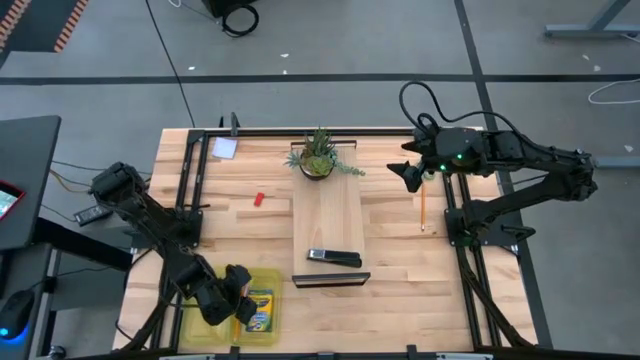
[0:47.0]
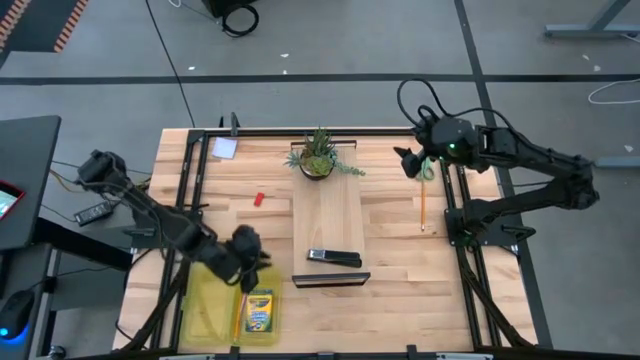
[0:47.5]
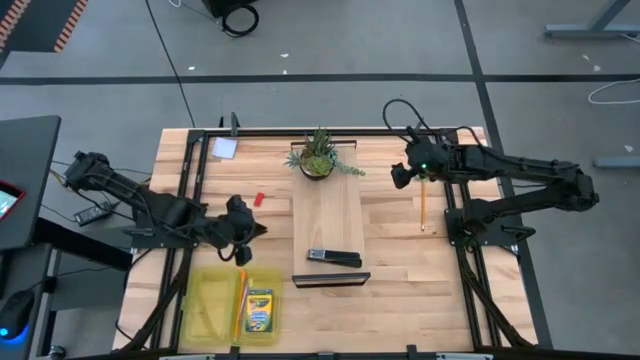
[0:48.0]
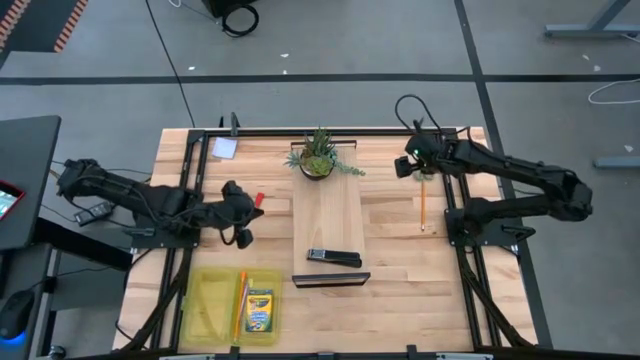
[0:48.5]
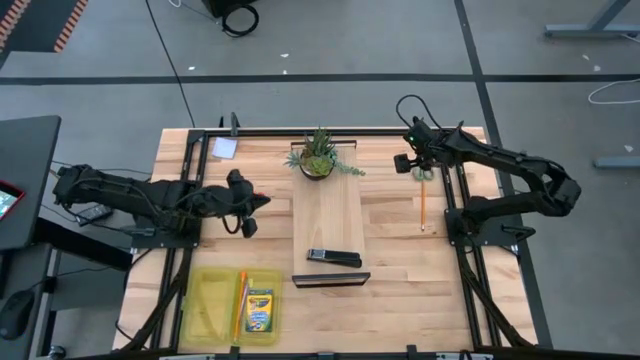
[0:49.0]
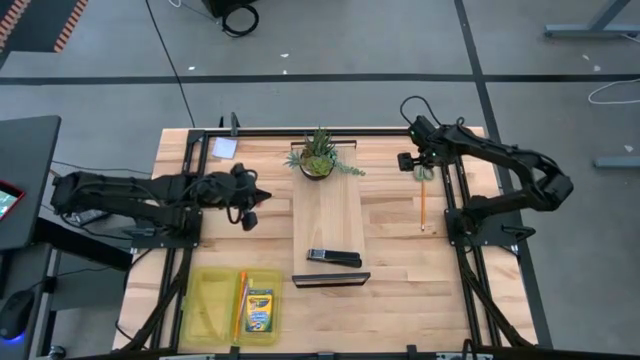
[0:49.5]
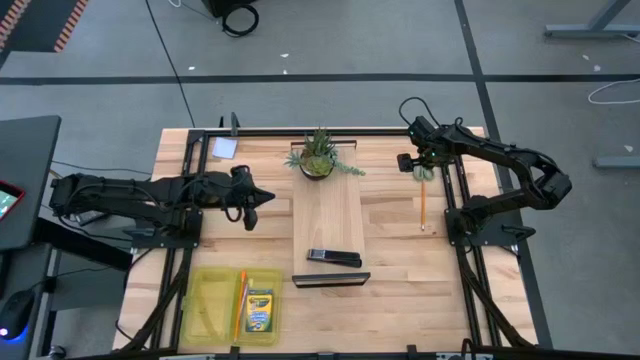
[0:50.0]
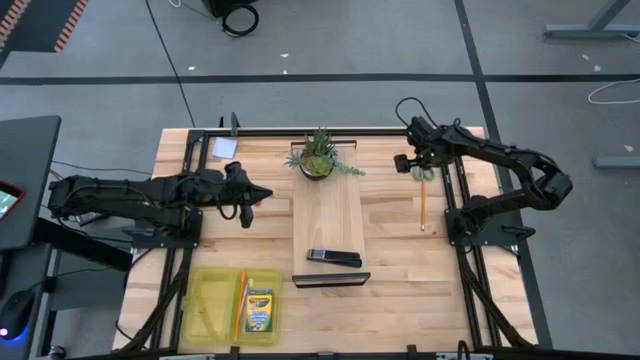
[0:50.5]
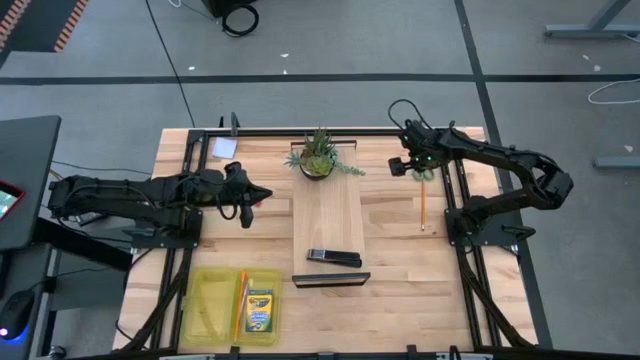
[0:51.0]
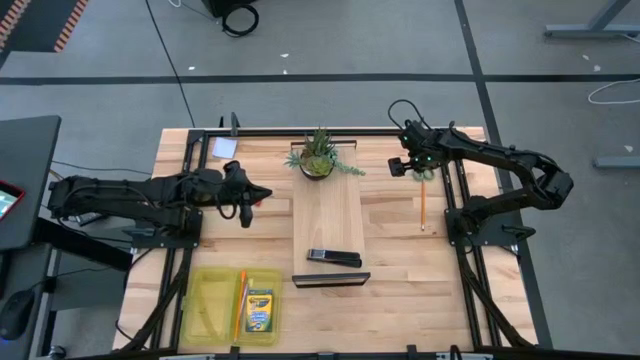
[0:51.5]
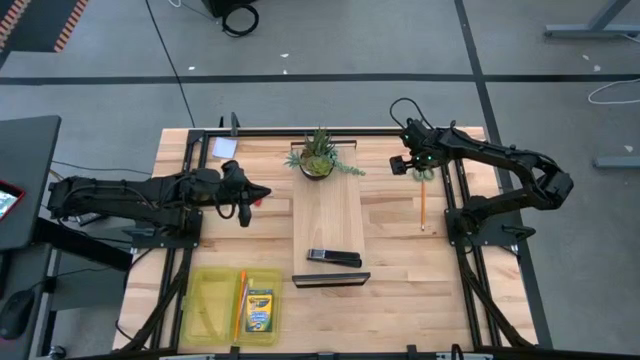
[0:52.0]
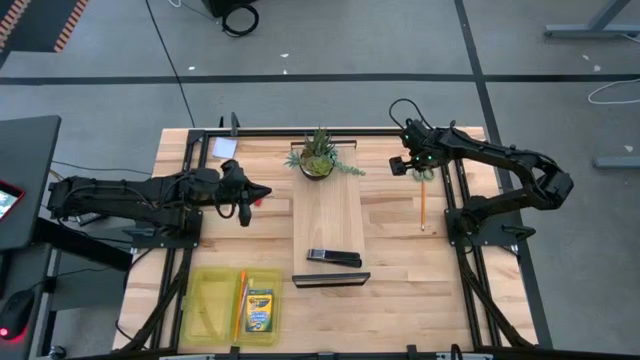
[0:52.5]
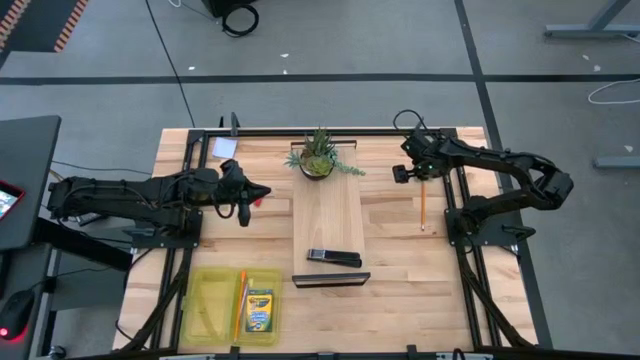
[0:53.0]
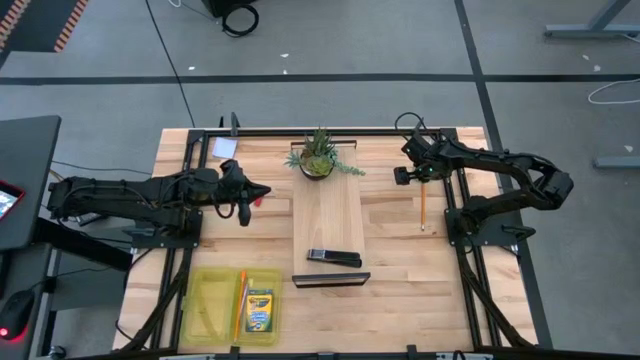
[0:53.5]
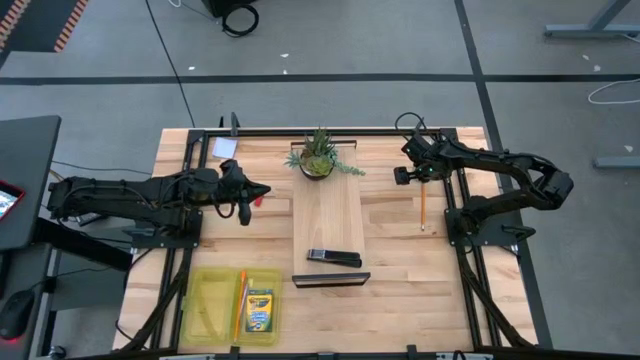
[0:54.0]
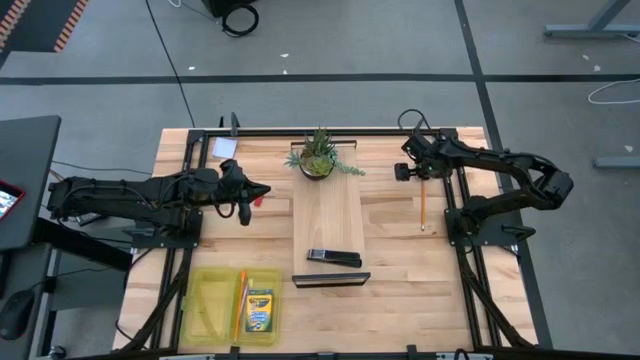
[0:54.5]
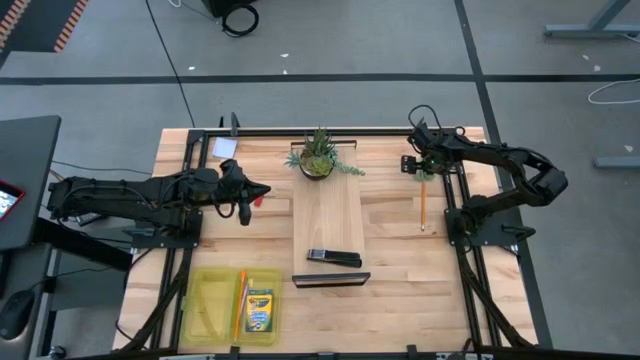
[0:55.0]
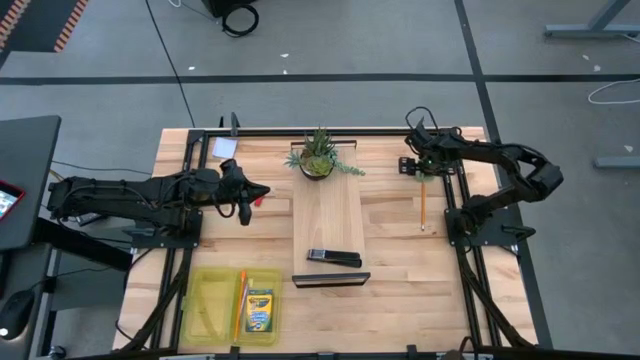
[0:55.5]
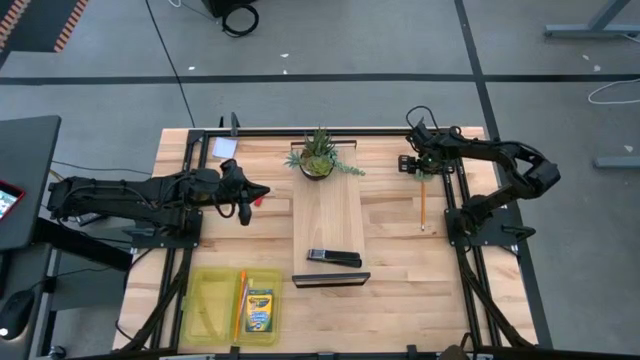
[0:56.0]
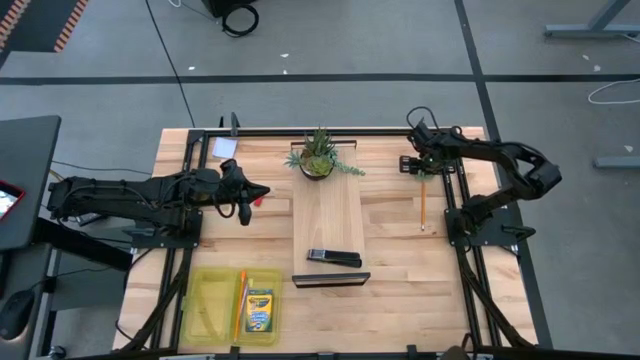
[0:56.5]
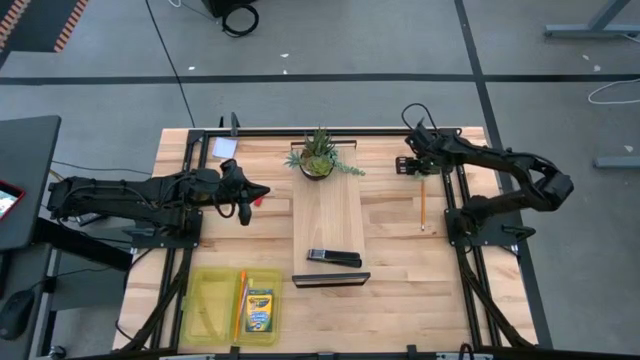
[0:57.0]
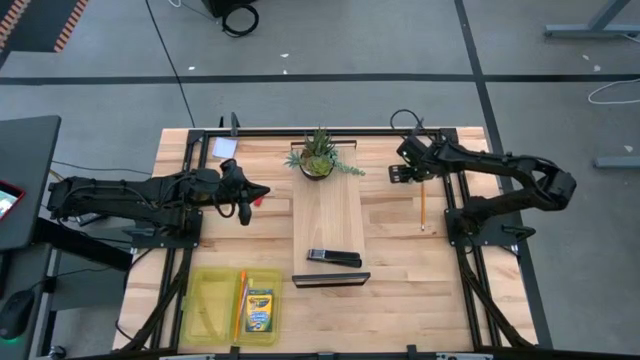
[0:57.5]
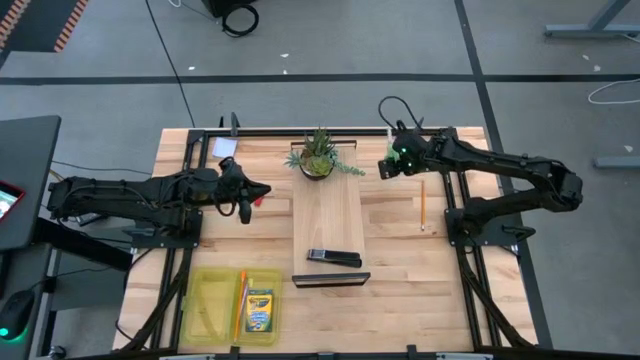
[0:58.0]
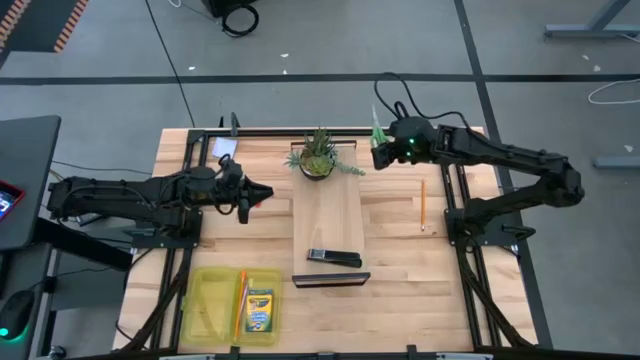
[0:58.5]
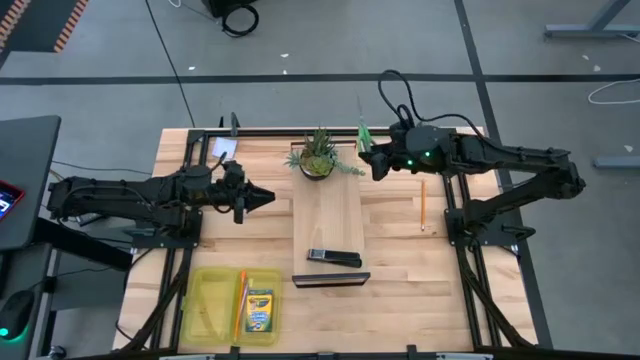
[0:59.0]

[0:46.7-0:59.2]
Task: Pack school essentials
Put the green scissors into the yellow supply box
